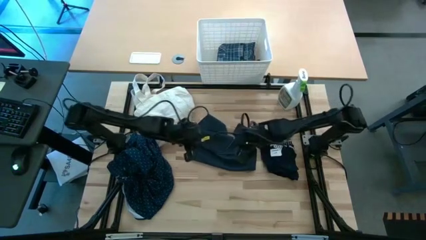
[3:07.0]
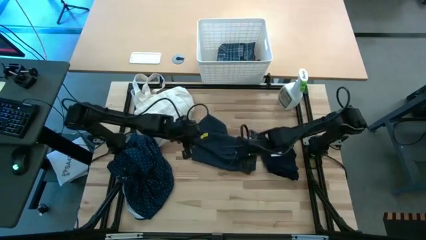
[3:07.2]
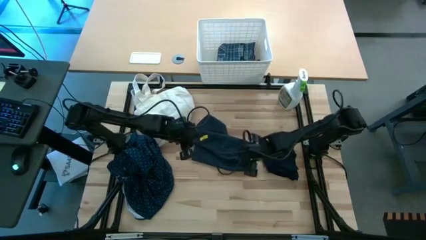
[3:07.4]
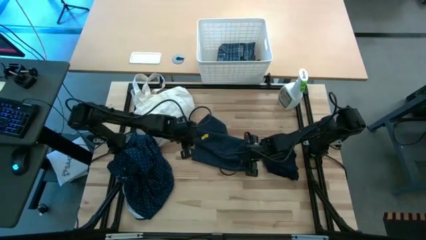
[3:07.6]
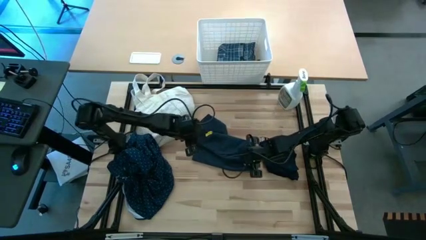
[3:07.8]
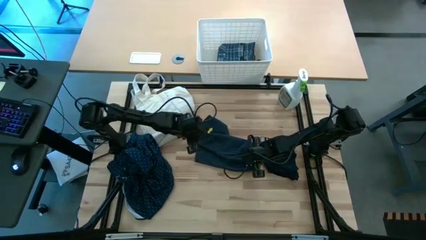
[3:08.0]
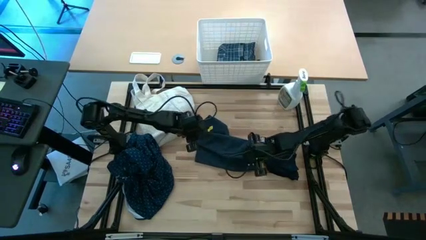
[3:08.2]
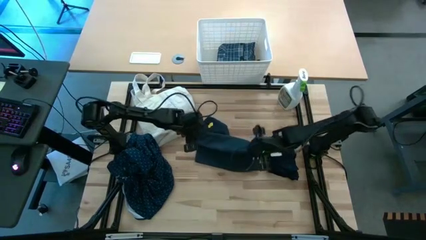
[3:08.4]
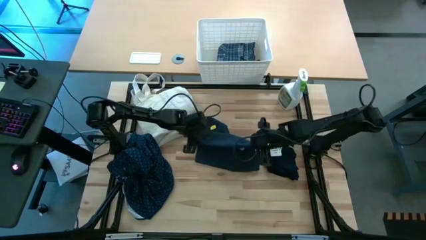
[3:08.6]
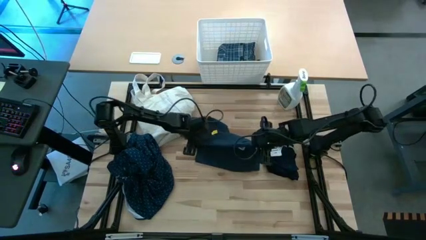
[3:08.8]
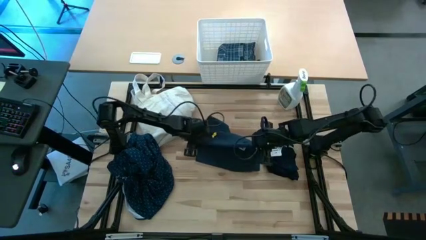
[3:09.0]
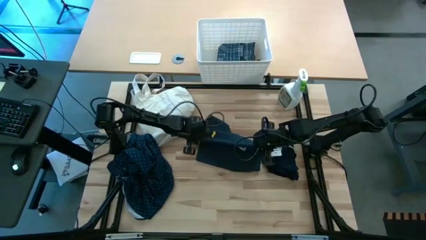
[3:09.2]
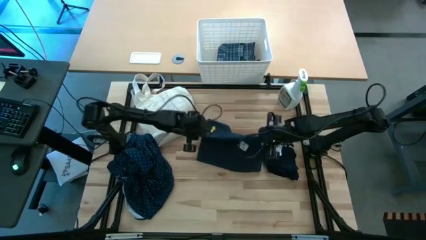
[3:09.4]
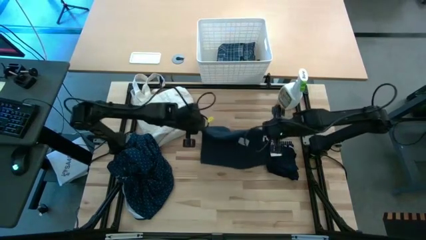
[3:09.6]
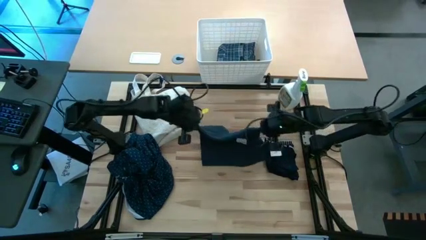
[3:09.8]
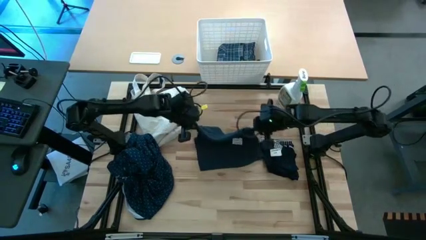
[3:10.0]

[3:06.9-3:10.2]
Fold the black short

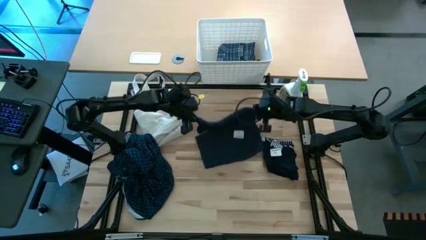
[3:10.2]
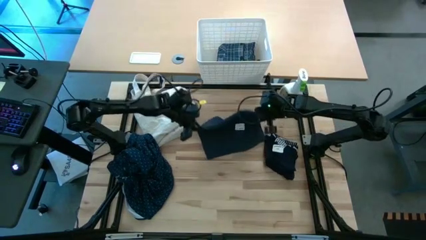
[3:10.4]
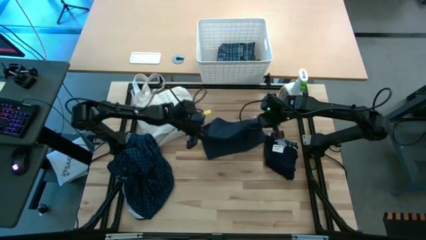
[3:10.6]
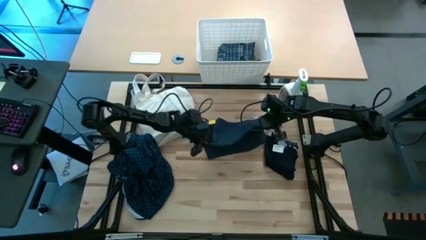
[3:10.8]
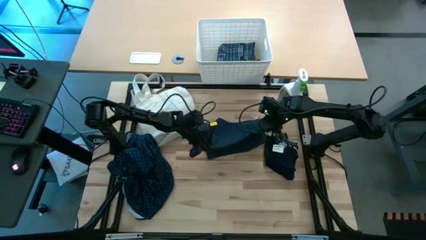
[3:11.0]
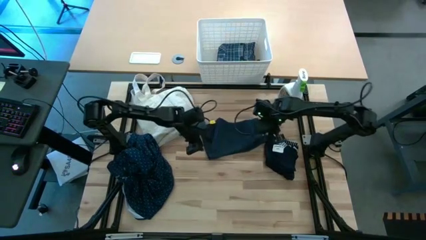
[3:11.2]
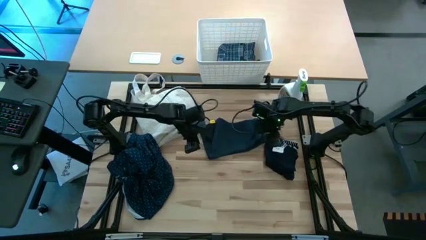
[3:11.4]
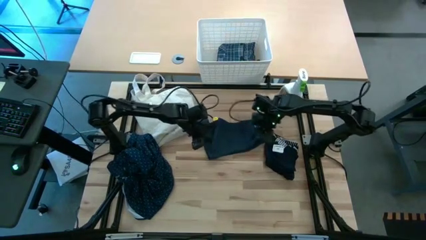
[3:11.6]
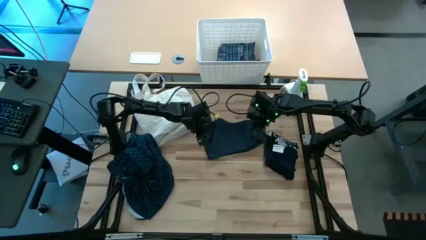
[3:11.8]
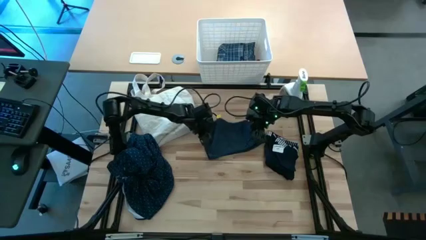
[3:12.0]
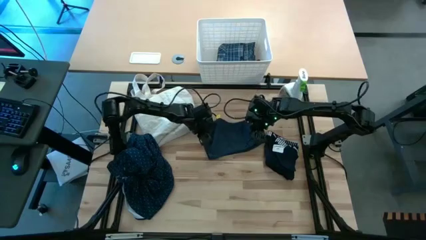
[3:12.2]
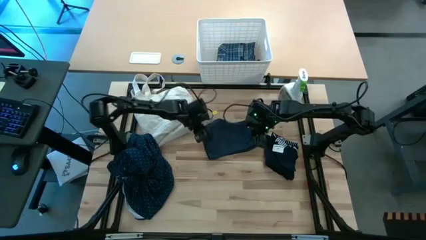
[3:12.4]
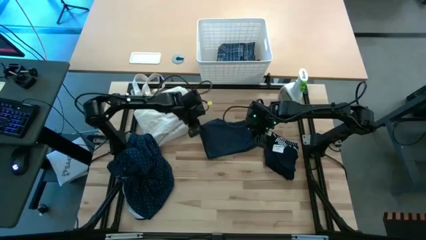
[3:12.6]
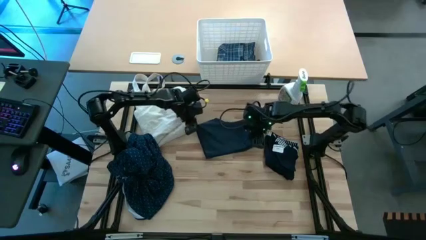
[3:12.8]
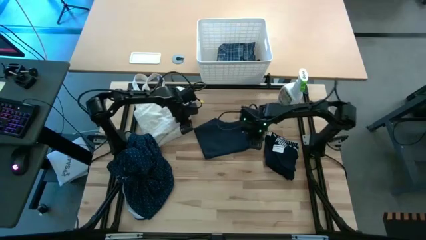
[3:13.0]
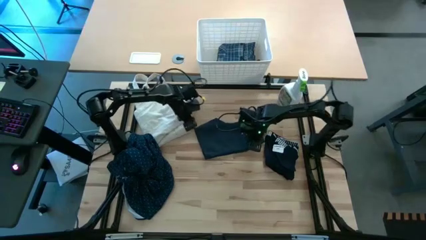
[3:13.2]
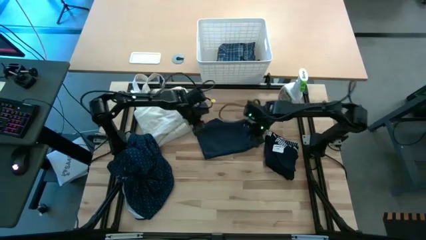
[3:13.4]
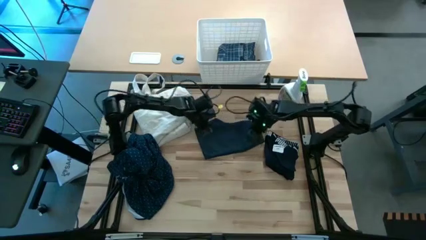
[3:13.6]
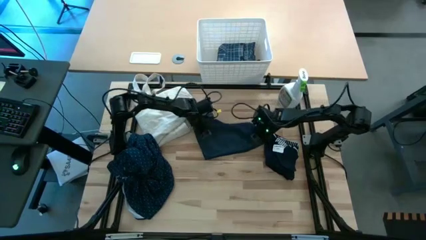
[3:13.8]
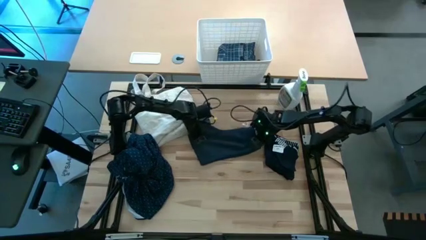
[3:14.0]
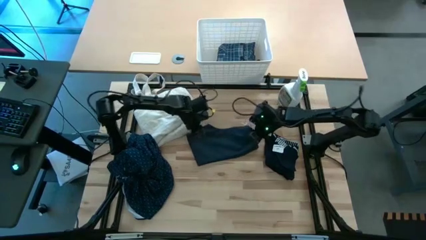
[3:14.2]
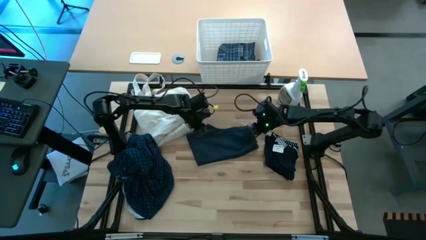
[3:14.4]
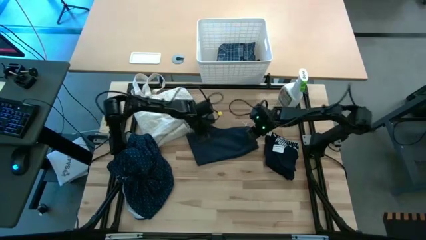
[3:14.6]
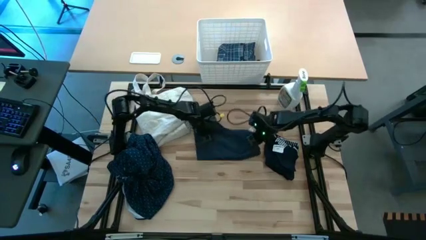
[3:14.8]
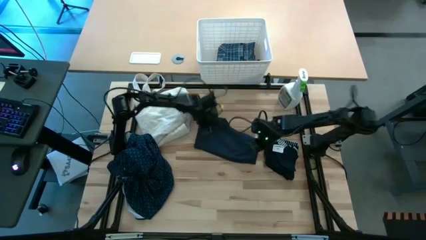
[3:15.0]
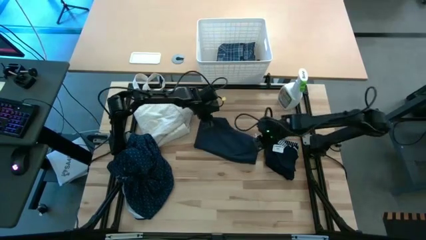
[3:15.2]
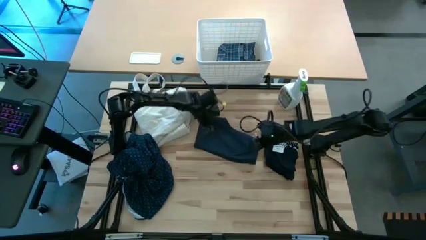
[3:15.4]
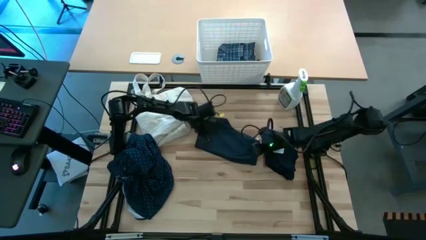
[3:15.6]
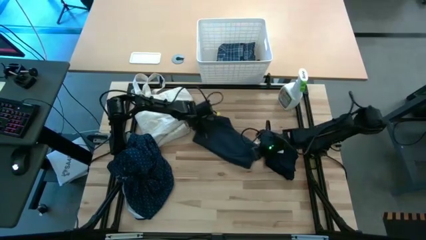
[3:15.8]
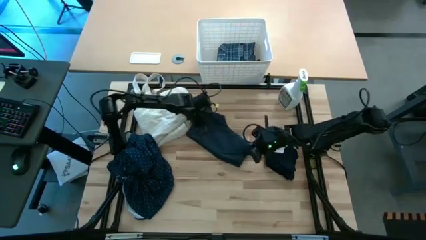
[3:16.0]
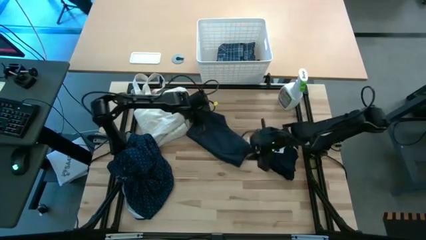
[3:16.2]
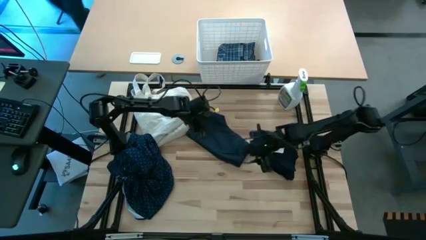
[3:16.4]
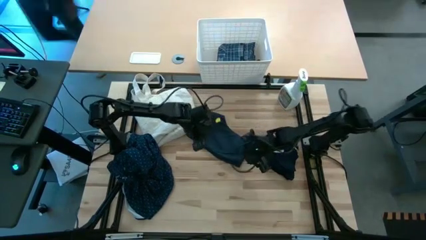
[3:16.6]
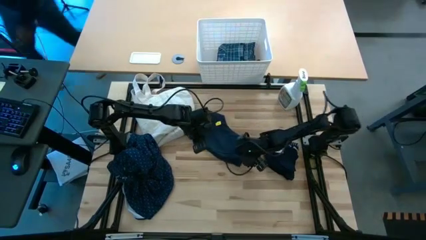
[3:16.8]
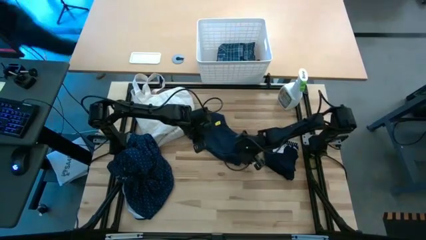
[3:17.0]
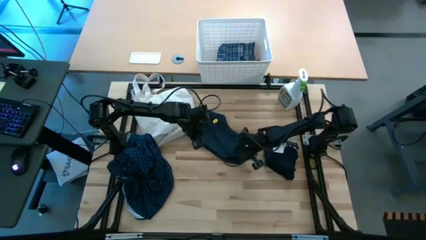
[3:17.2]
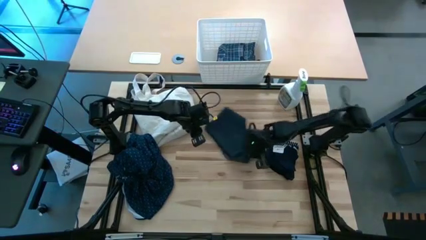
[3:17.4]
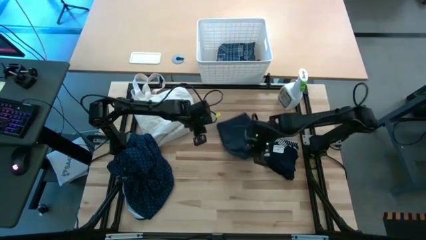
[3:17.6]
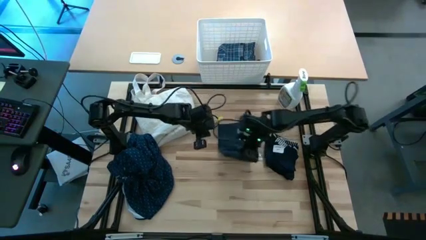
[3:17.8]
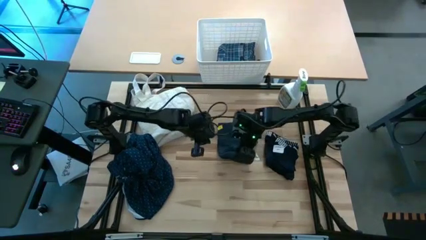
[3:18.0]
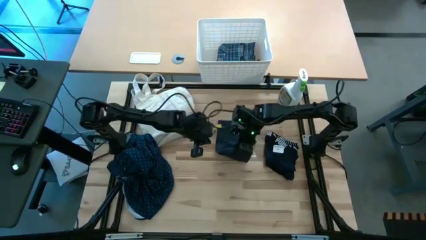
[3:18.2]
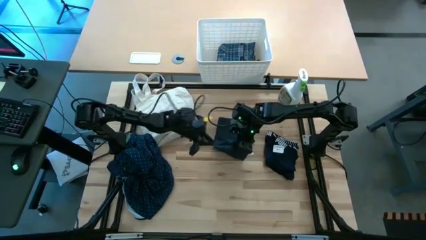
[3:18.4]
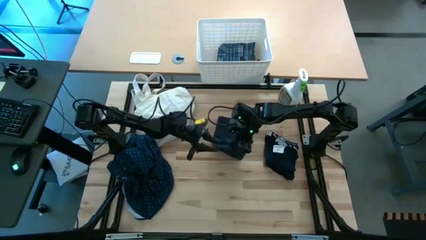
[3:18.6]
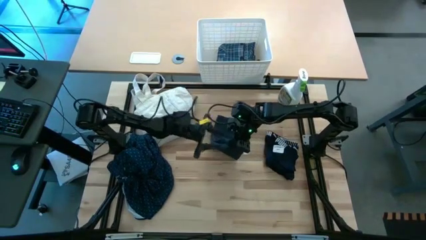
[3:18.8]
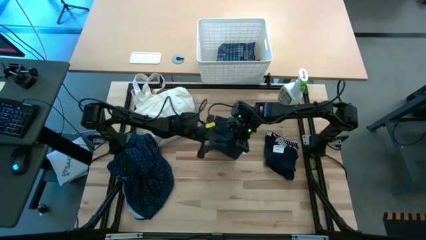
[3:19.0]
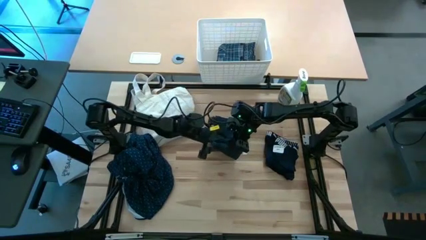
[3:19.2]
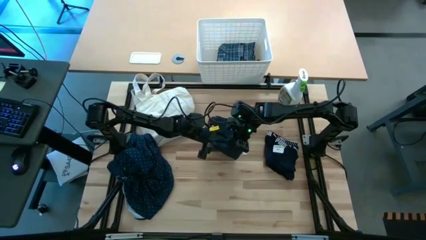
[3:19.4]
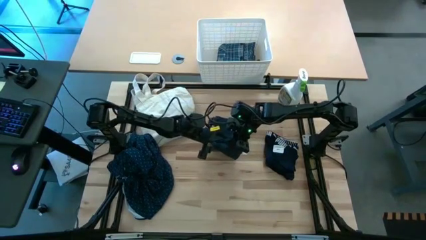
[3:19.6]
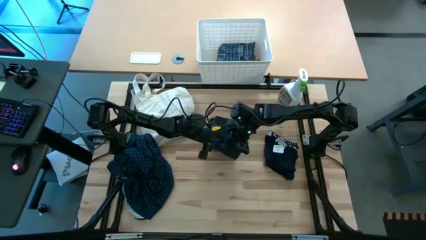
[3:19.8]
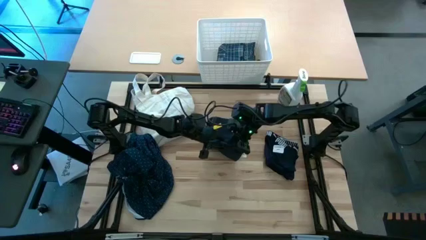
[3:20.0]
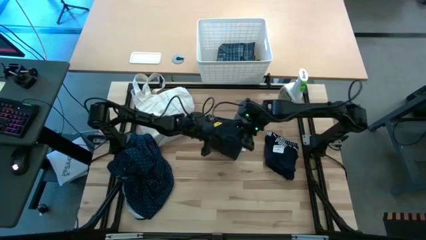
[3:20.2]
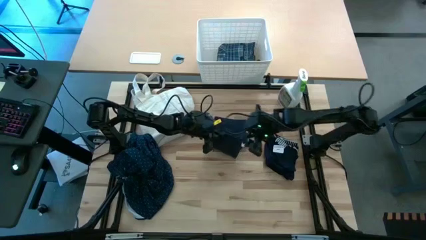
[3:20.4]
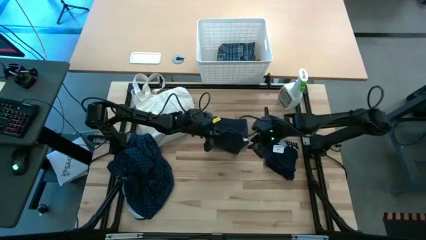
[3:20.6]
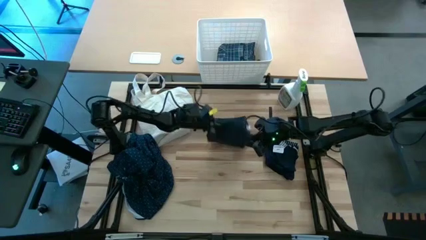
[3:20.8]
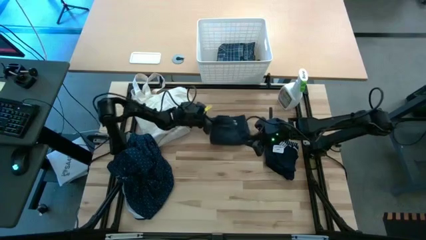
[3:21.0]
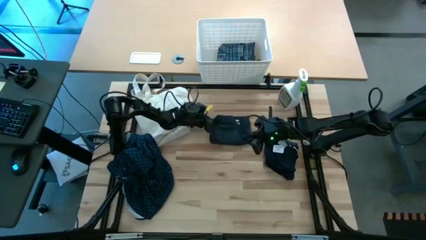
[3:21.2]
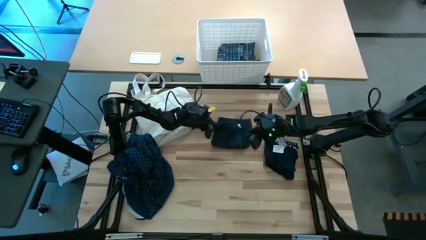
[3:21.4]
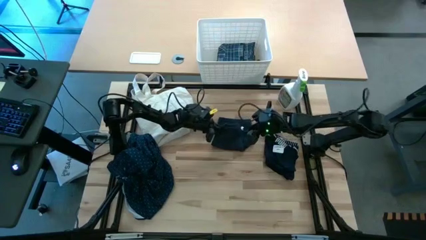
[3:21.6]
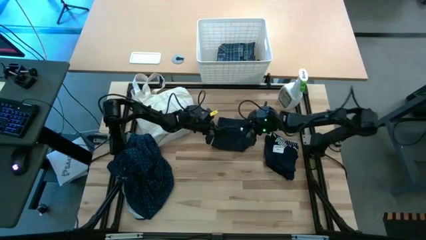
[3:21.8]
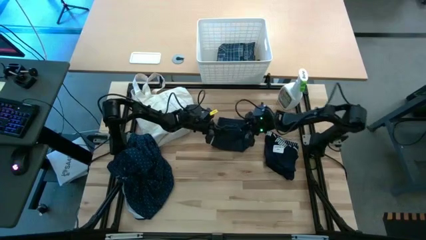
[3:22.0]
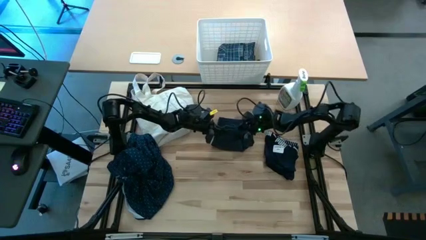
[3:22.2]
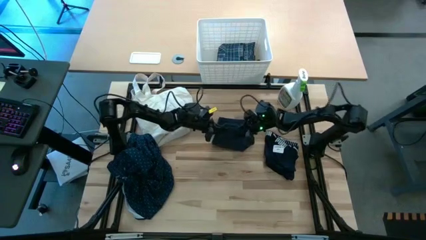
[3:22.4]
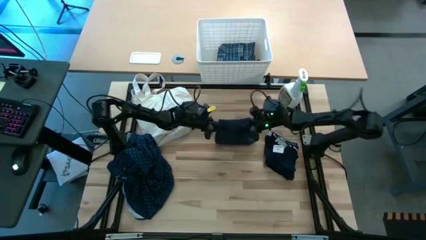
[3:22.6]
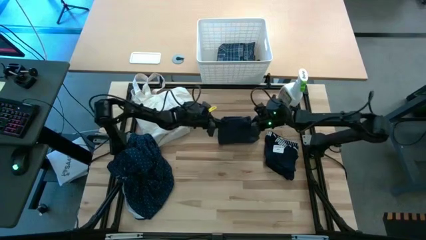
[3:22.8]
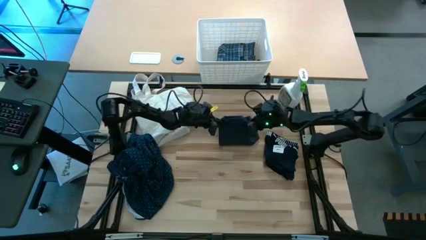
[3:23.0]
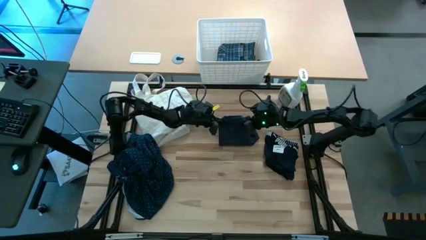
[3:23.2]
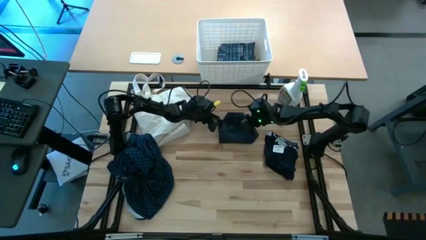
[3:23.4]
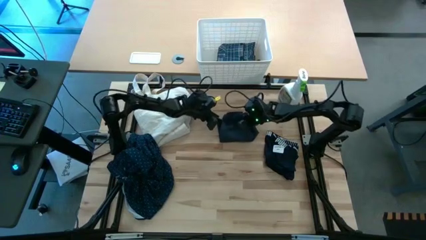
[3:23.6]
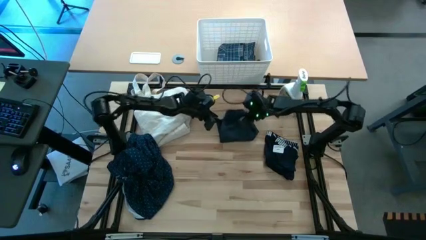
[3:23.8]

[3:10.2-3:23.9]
Fold the black short
